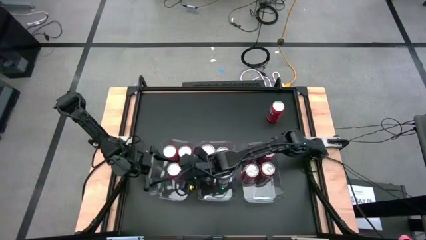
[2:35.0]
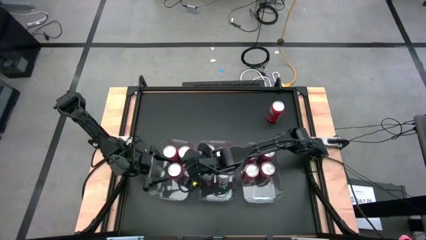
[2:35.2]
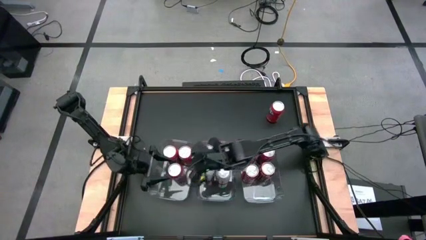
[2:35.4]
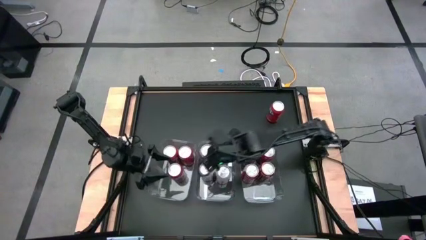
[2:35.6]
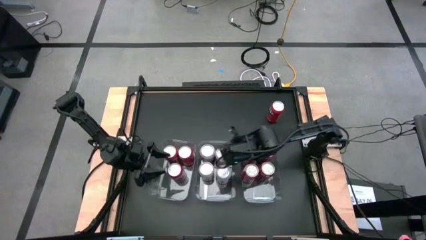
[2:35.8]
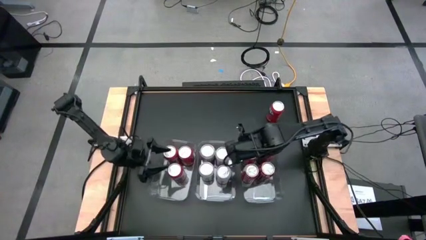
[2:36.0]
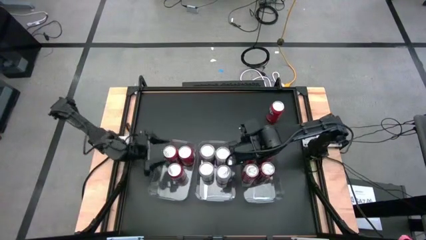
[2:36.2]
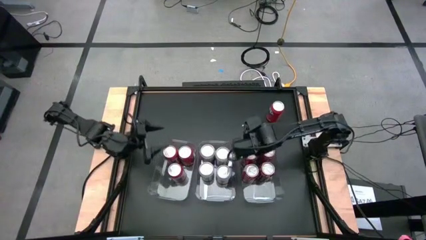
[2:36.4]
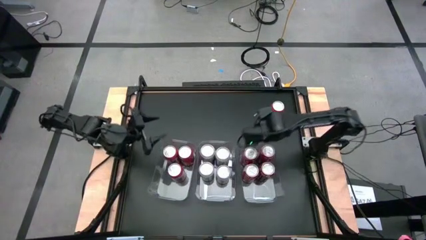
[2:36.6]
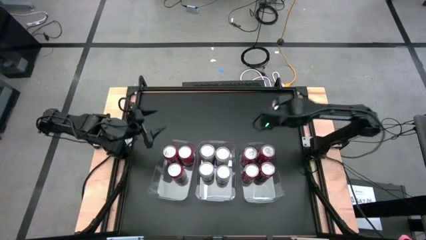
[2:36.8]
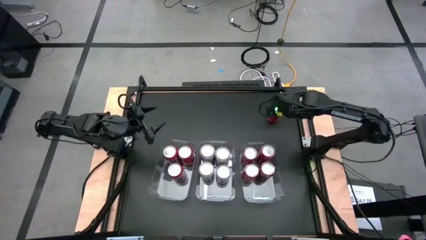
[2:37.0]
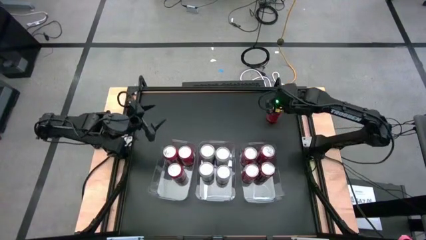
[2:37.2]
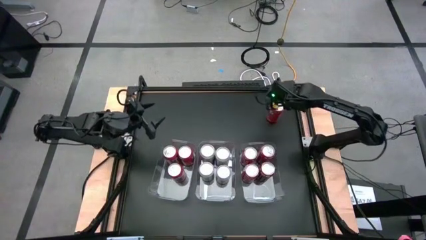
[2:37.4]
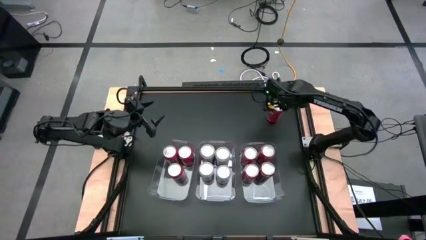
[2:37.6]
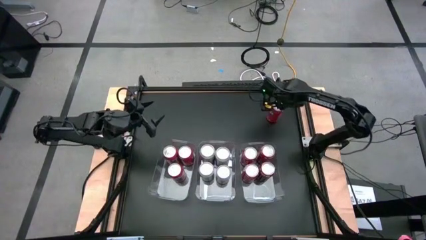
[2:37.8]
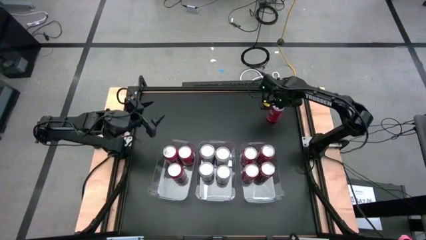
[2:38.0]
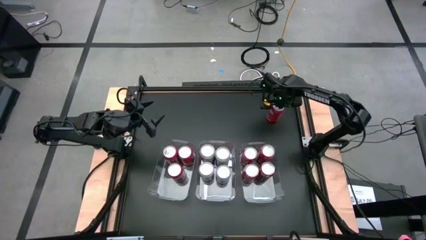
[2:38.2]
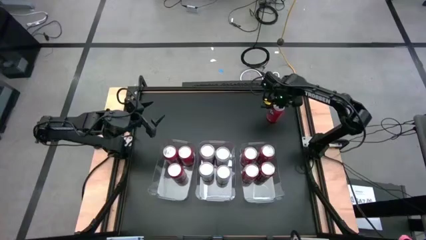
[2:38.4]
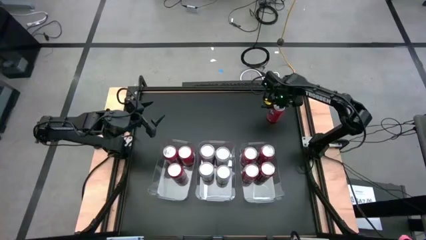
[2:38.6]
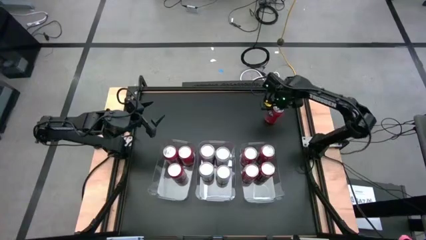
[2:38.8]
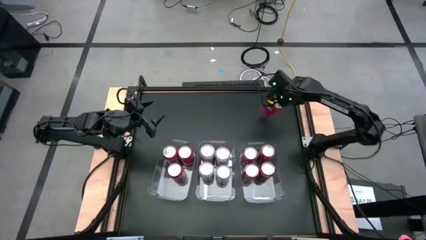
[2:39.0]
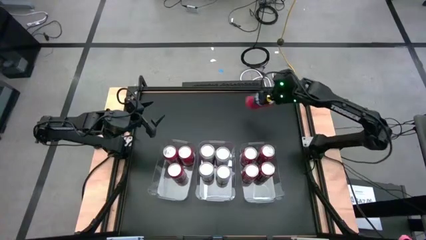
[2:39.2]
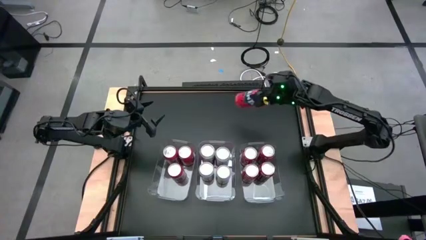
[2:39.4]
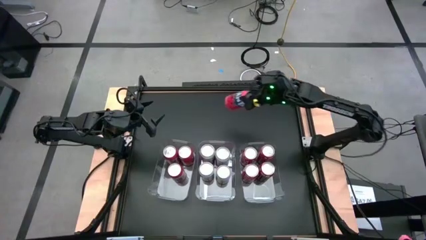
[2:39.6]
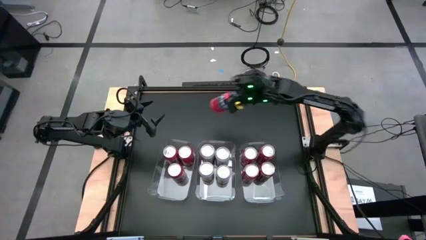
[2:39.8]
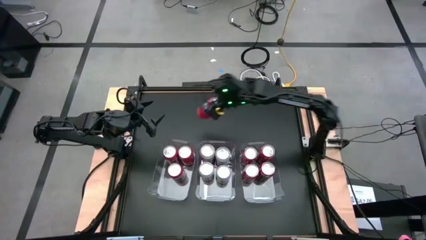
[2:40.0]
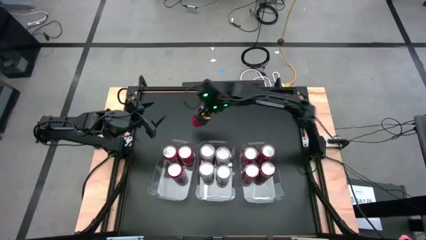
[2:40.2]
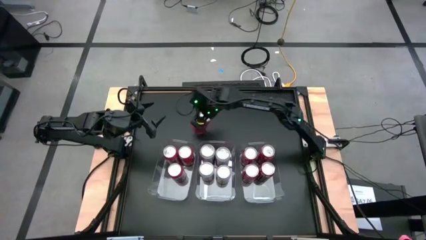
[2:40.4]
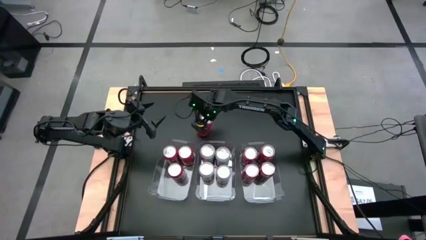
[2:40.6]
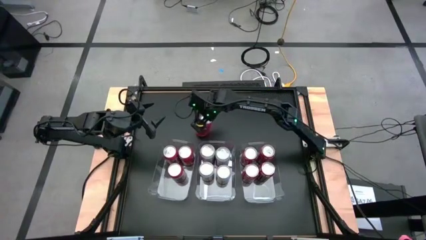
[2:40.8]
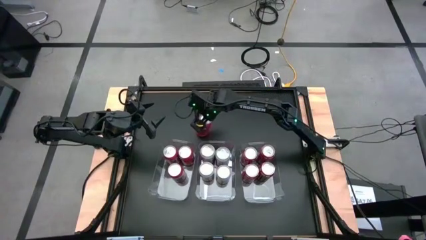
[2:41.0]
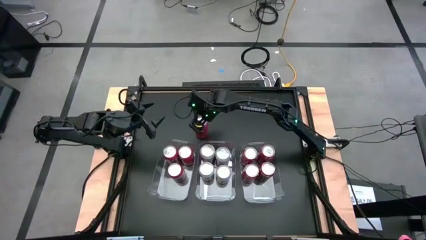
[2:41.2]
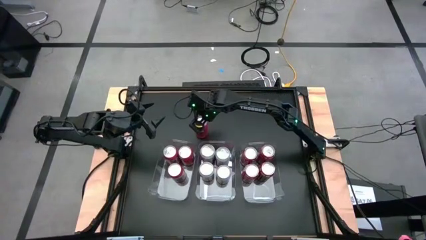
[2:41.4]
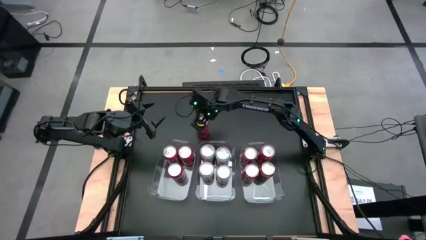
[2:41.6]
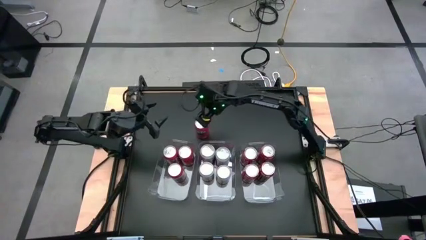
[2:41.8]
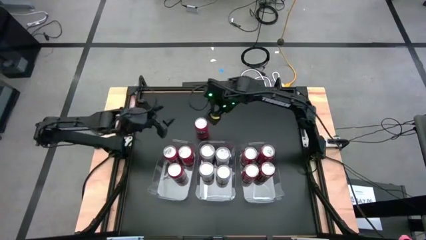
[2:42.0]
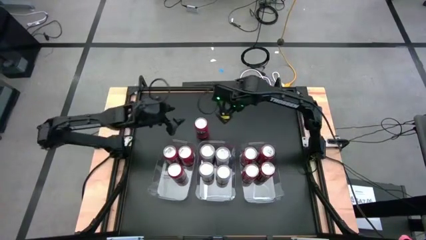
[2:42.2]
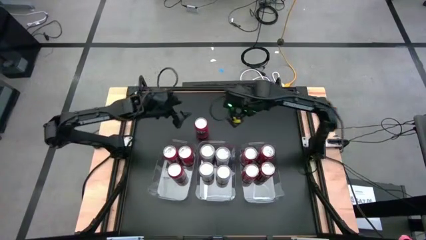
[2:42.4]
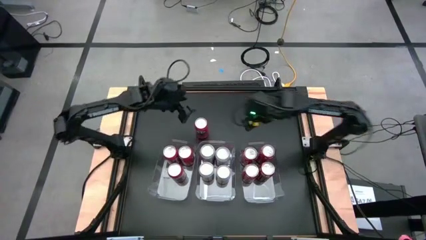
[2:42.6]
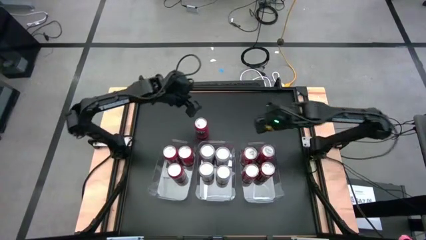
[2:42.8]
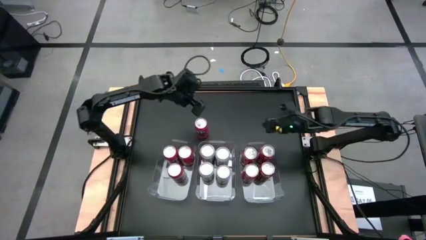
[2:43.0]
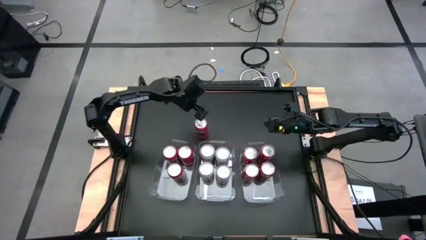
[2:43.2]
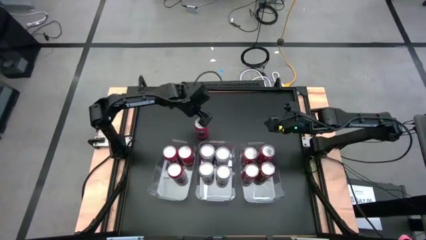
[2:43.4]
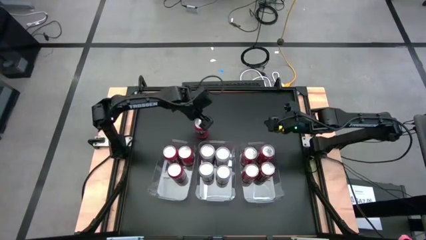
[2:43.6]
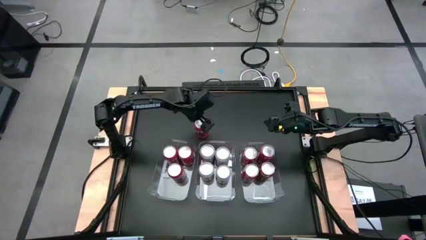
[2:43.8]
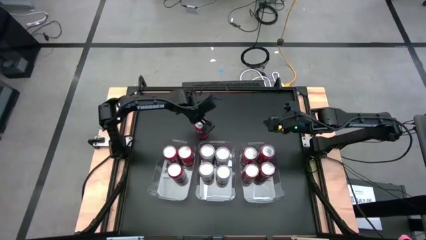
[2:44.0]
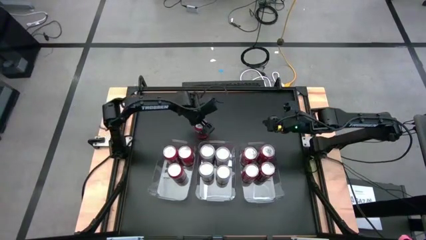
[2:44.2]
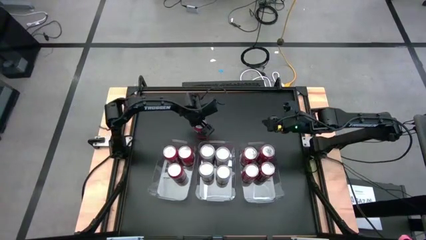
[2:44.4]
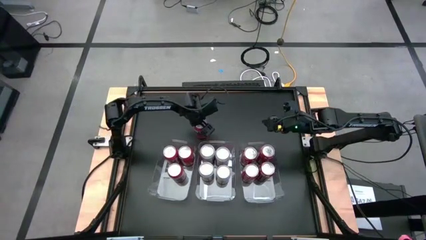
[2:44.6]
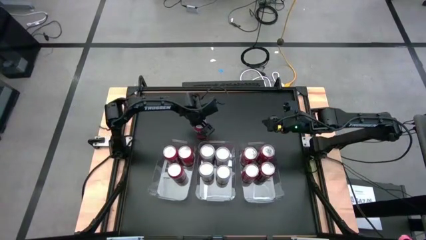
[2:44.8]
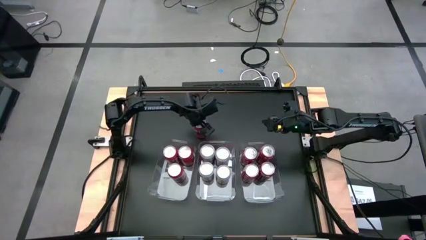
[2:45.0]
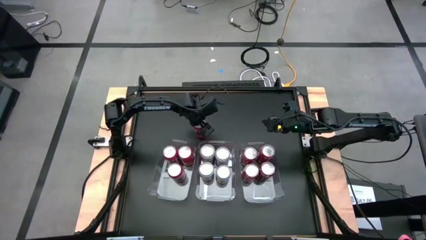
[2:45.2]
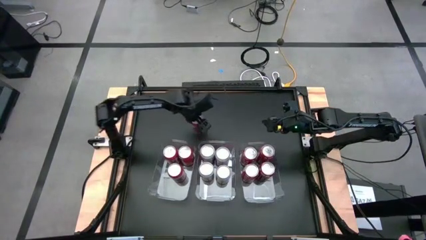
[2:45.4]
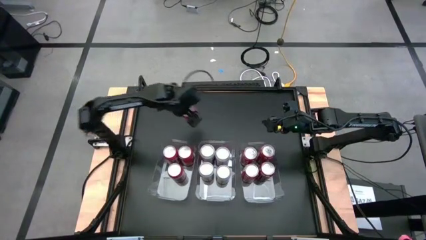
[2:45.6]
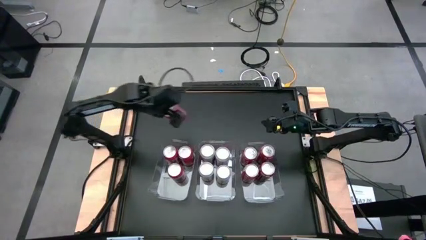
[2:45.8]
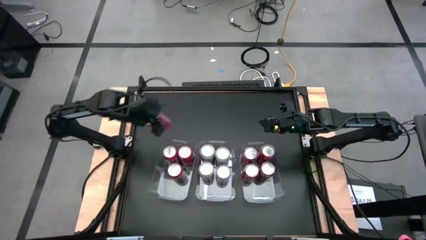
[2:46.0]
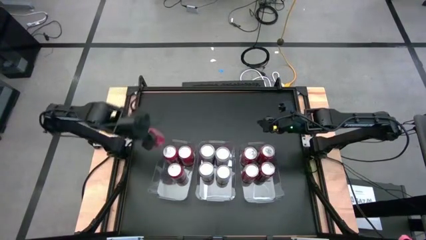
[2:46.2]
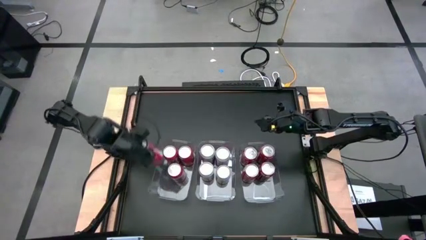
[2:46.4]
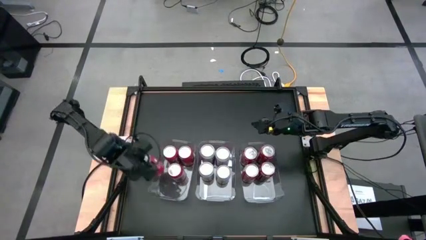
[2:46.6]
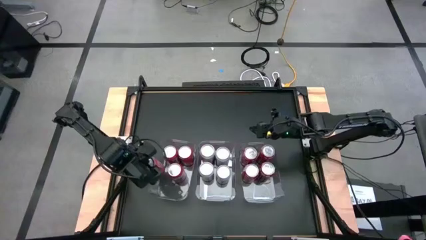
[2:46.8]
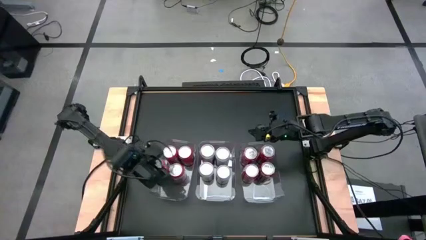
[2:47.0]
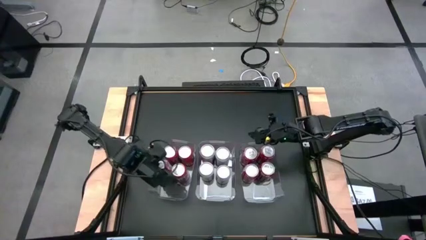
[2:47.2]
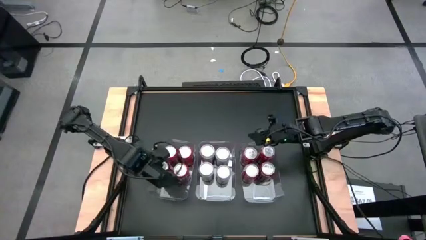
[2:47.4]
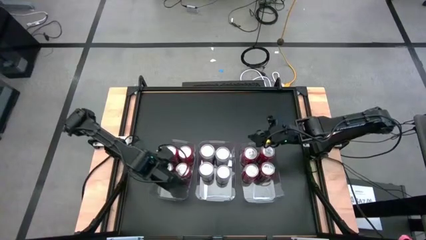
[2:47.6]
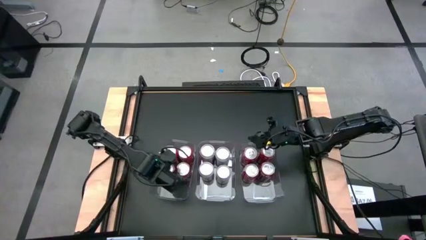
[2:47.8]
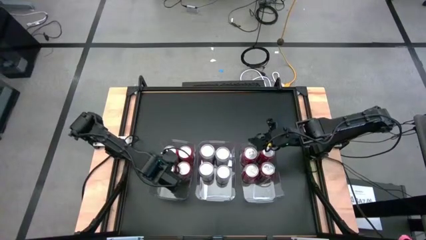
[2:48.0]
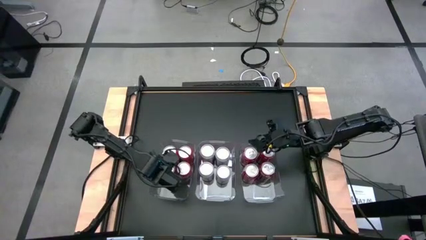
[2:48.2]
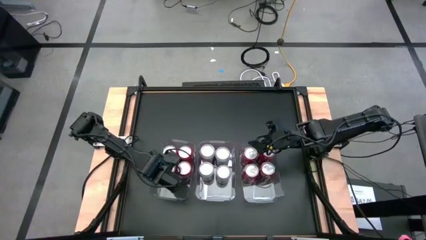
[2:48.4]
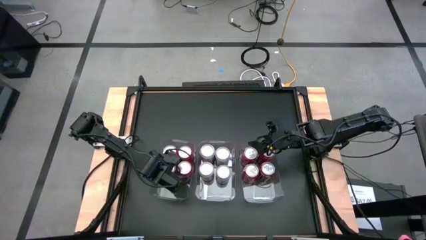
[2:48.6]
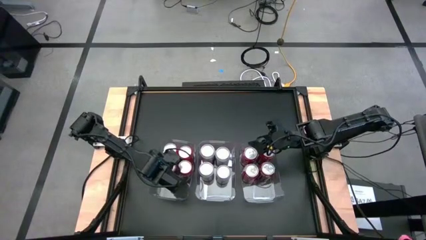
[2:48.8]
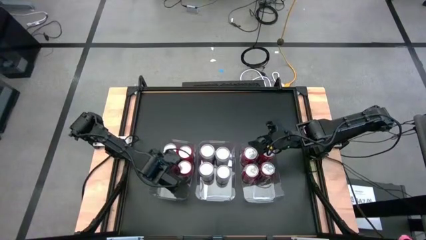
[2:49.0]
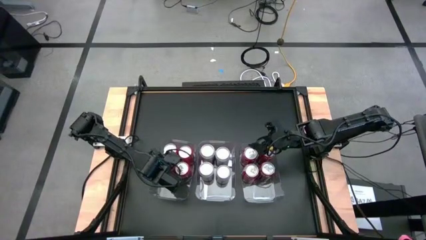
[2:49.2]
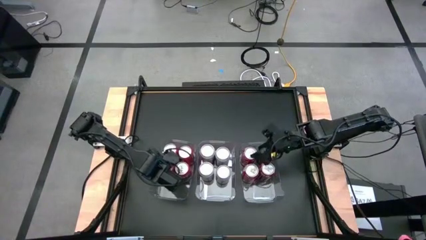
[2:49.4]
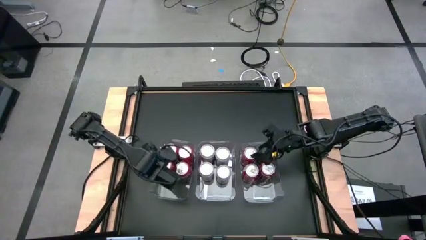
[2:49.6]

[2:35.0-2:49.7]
Task: Sort soda cans
Put the orange soda can into the left transparent bin

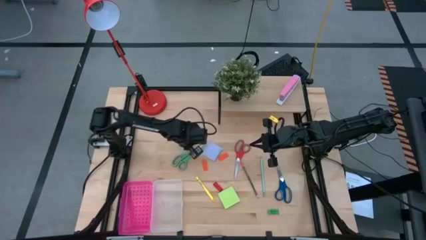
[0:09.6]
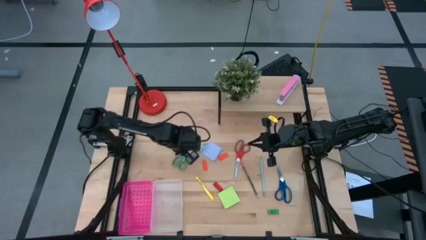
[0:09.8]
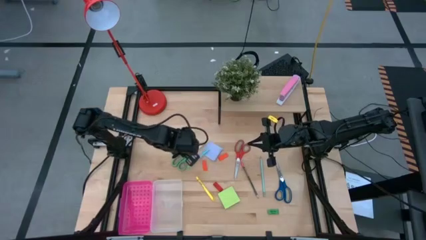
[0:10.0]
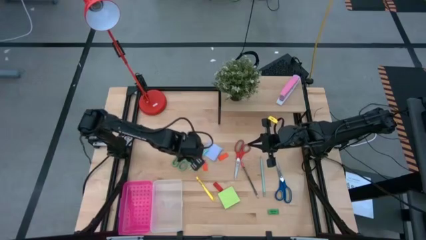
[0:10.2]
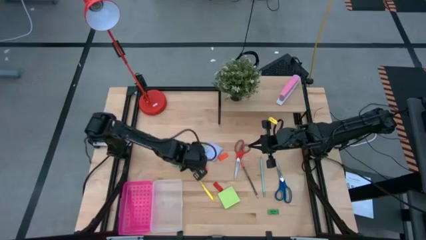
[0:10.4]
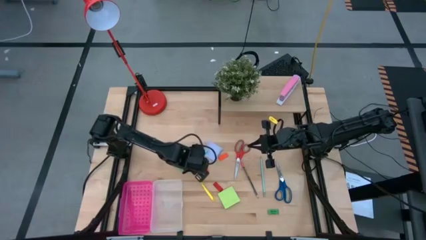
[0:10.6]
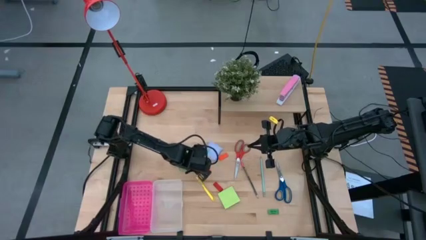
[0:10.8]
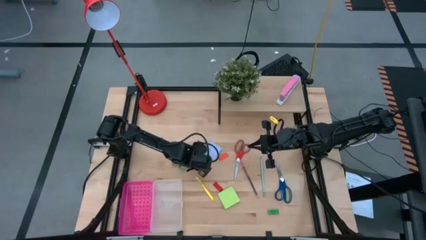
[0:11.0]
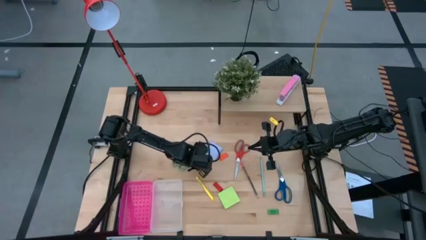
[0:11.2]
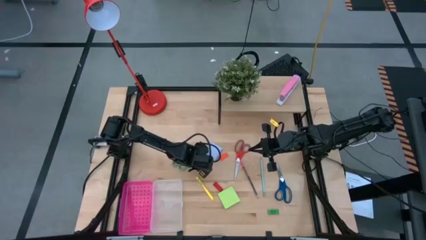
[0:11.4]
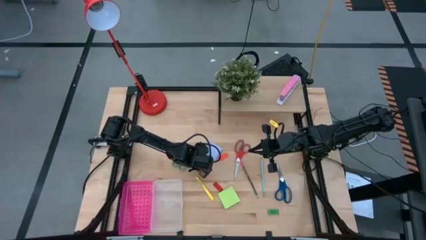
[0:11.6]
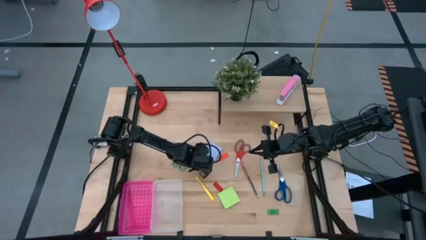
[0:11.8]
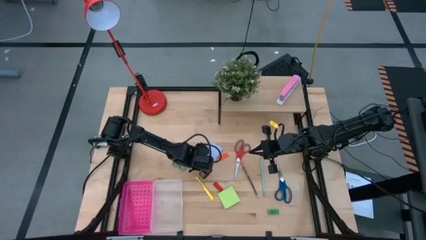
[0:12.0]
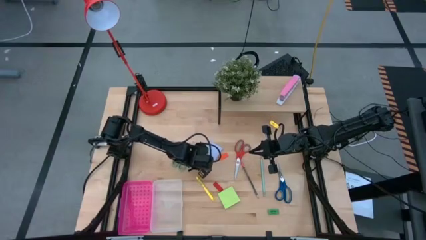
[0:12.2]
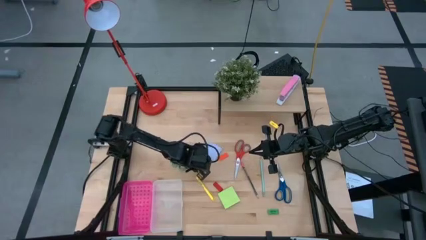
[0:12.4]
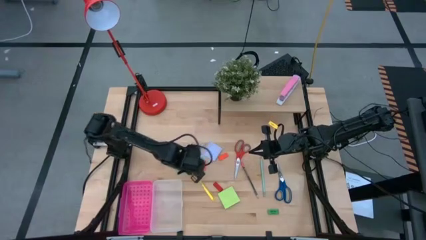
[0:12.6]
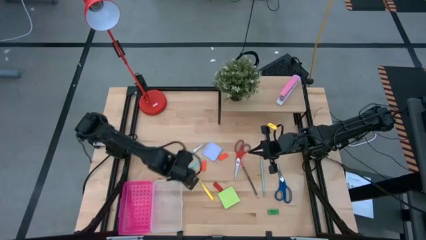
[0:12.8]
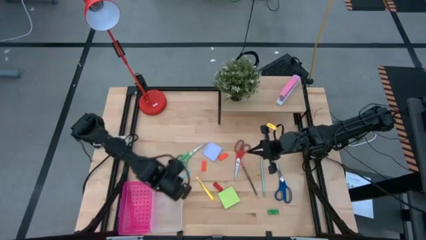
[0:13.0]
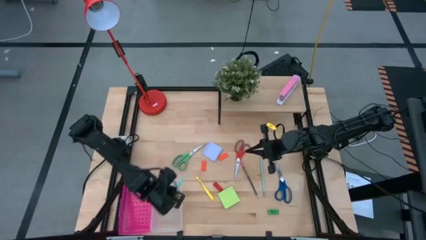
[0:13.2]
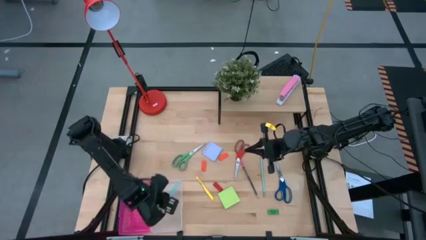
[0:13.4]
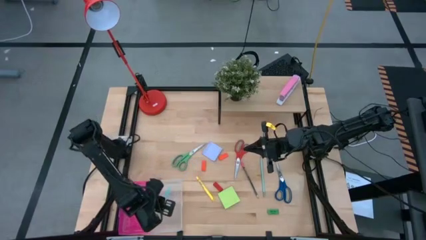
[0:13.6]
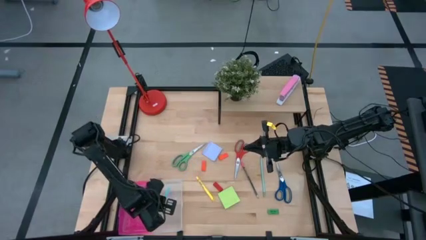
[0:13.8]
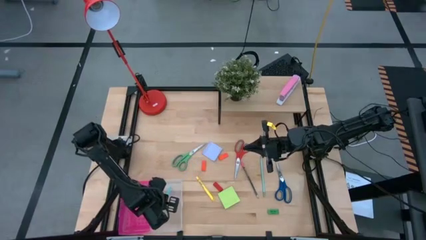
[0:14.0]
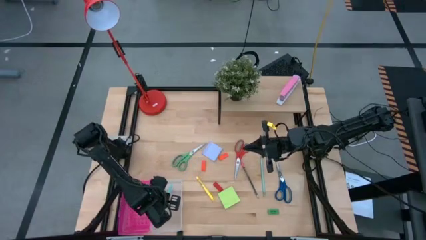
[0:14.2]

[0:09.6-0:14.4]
Task: Pack school essentials
Put the light blue pen into the pink supply box
